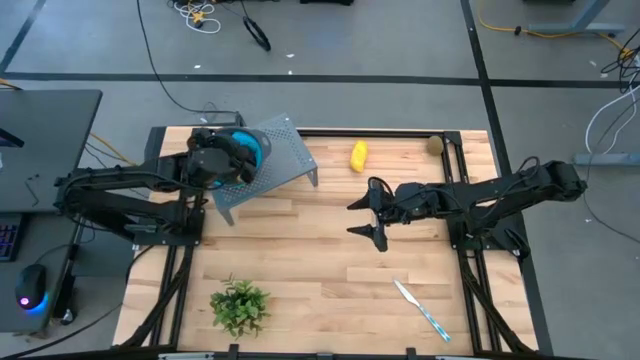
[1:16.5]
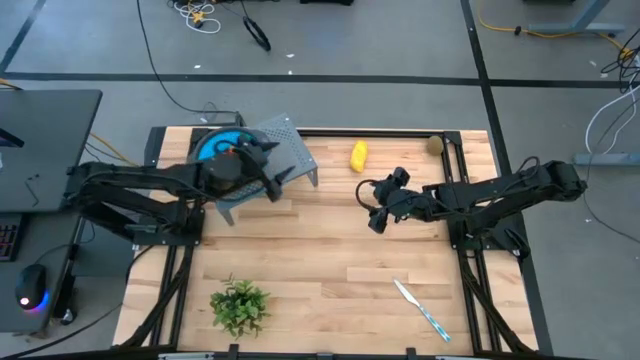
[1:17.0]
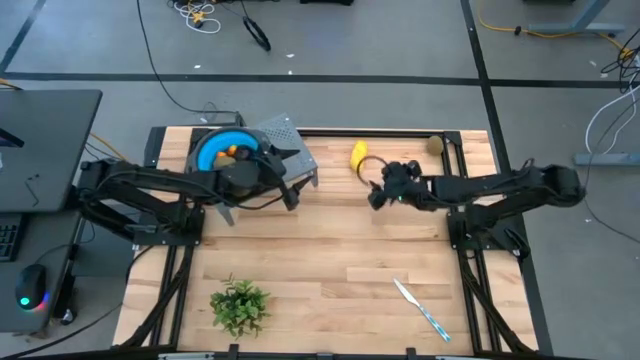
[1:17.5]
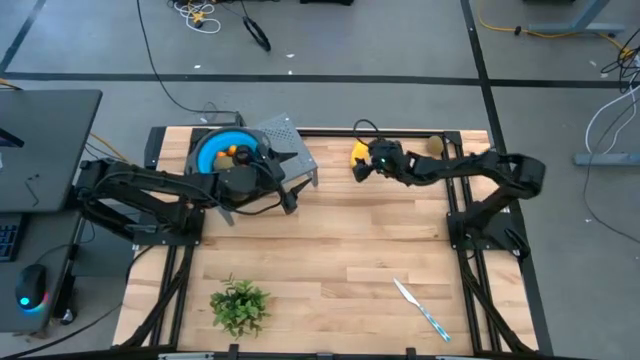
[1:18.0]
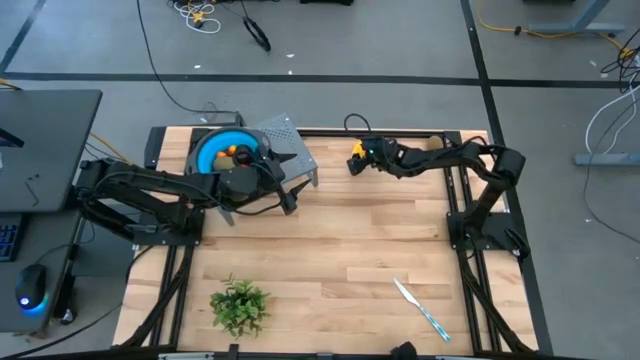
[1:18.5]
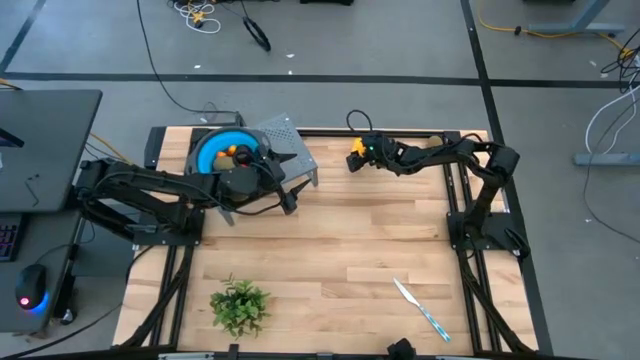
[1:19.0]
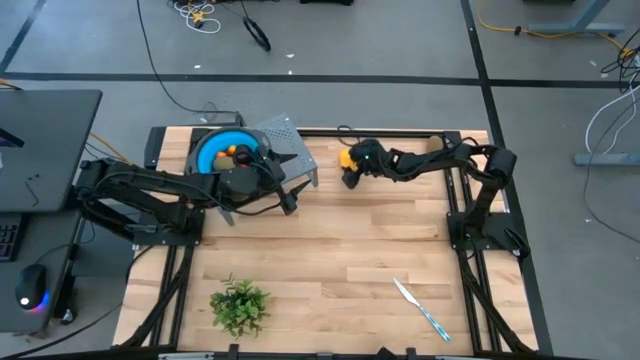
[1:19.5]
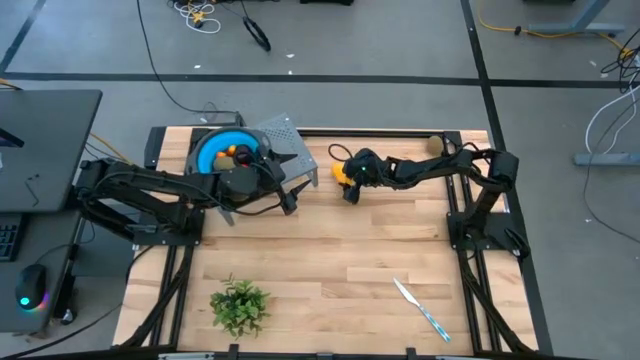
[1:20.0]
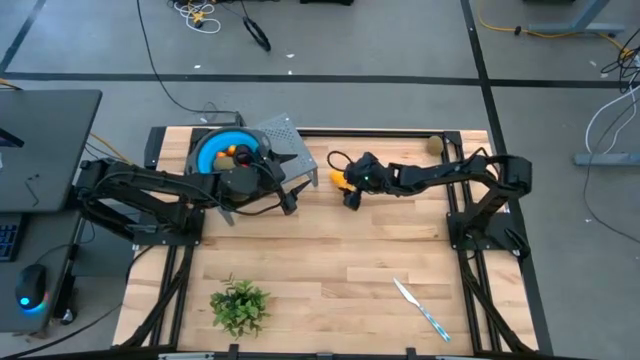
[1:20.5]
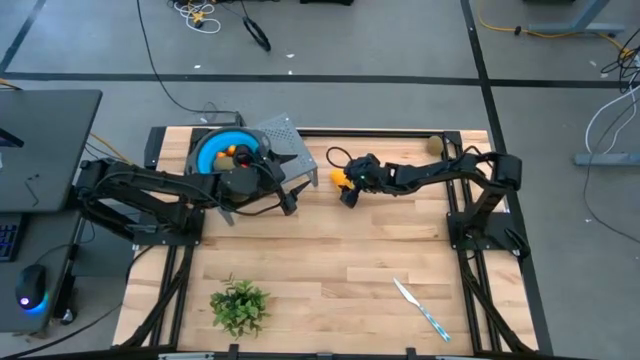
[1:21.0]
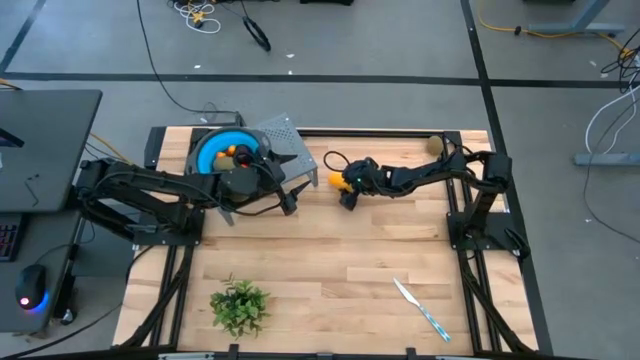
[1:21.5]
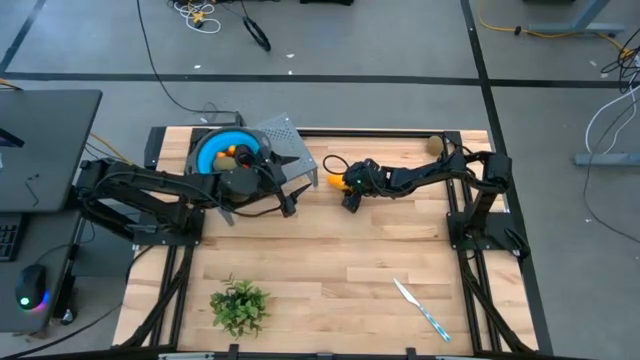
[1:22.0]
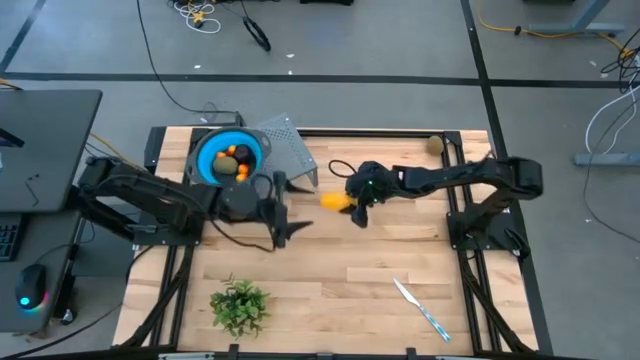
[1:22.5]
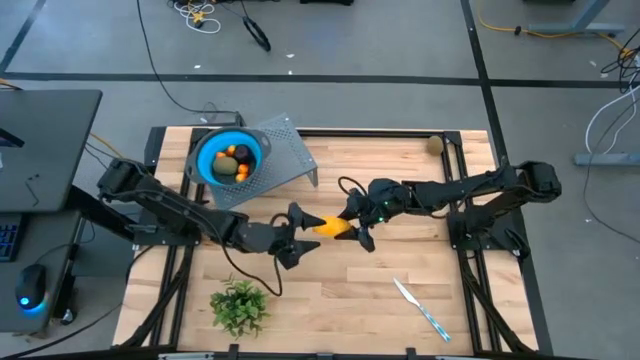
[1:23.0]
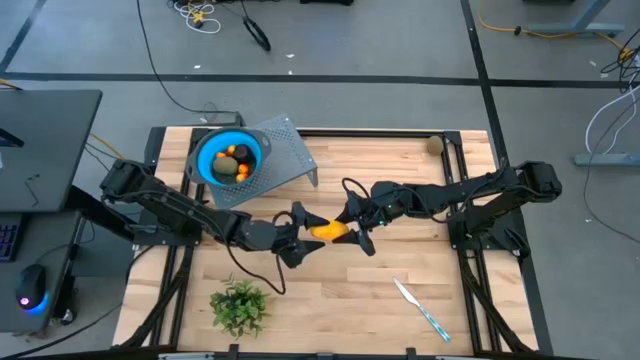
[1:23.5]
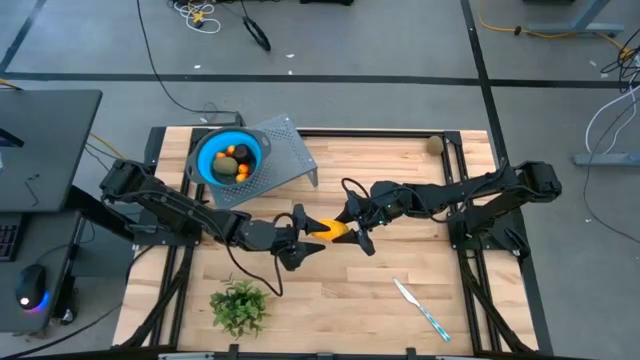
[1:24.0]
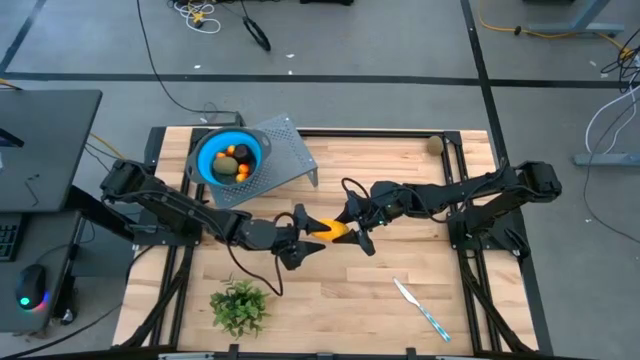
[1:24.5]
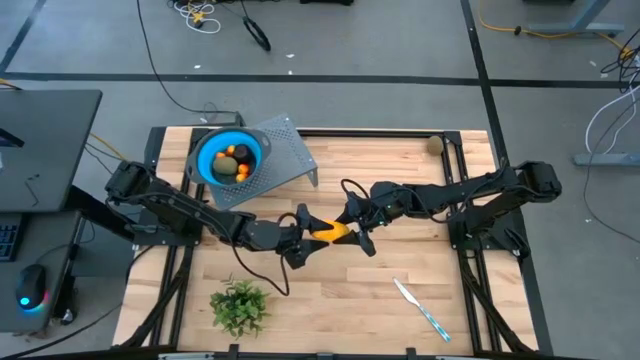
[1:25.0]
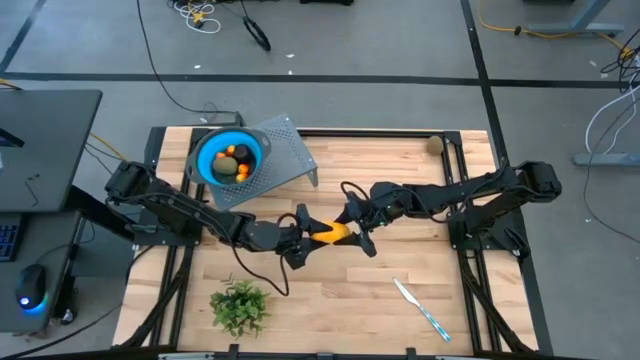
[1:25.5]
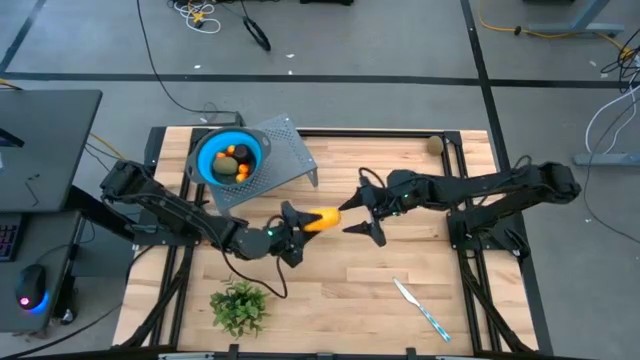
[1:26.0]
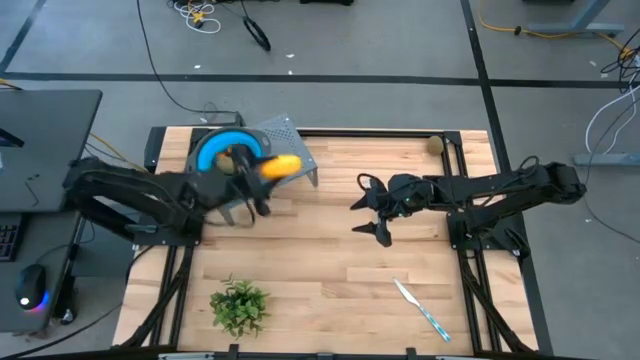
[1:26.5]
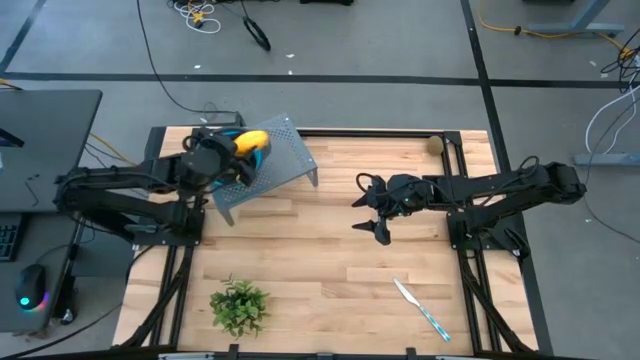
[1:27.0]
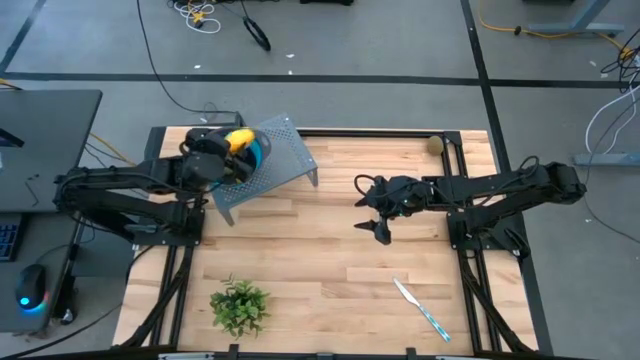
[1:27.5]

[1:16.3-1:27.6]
Task: Pick & Place Fruit
Put the yellow mango into the blue bowl on the shelf

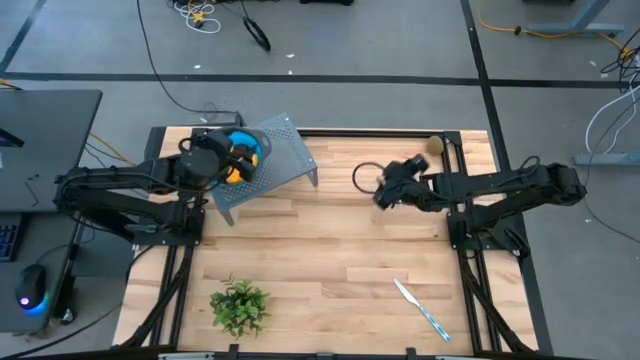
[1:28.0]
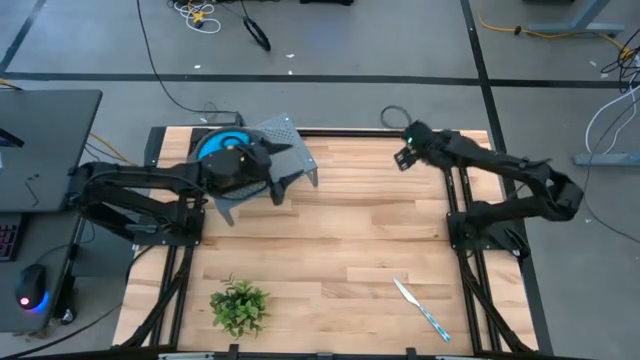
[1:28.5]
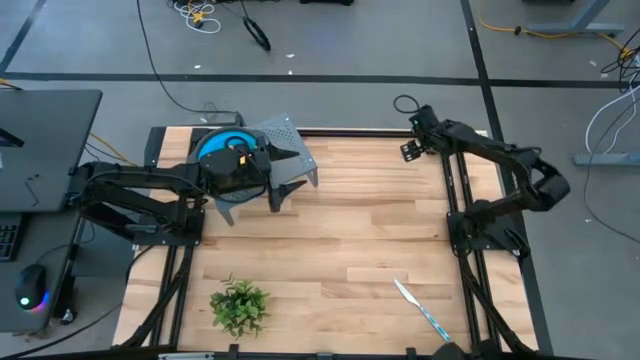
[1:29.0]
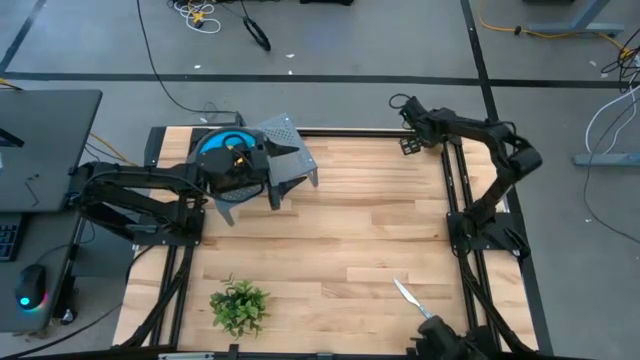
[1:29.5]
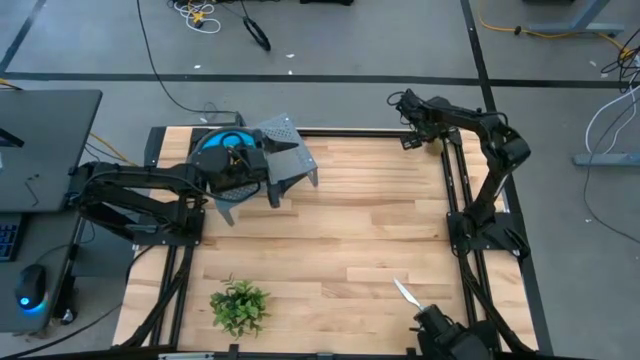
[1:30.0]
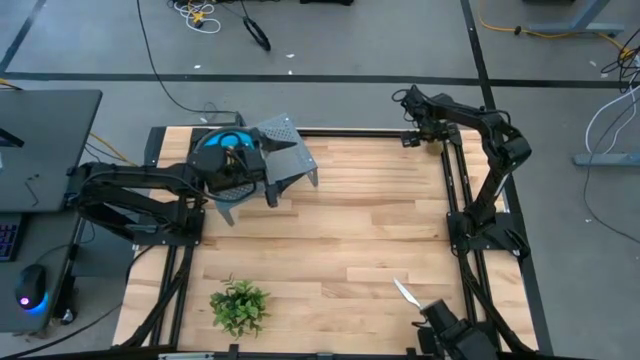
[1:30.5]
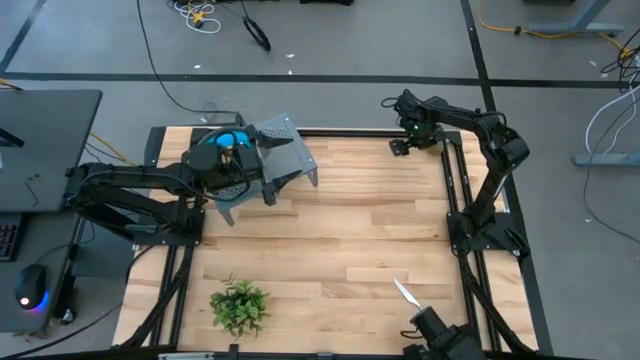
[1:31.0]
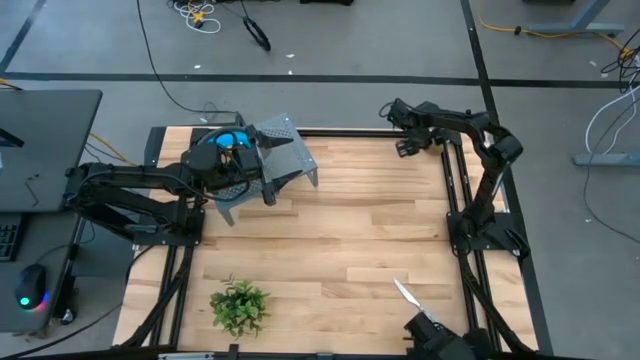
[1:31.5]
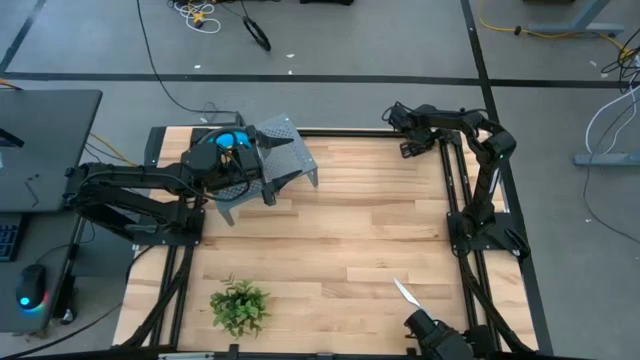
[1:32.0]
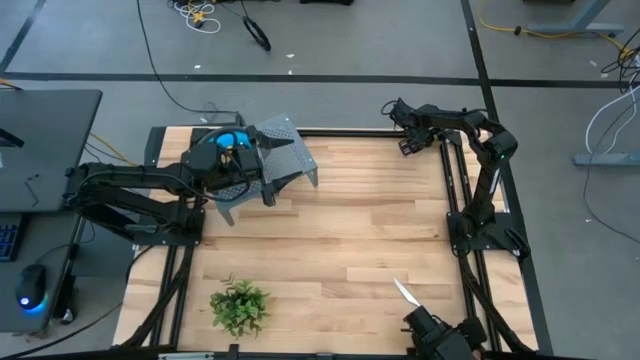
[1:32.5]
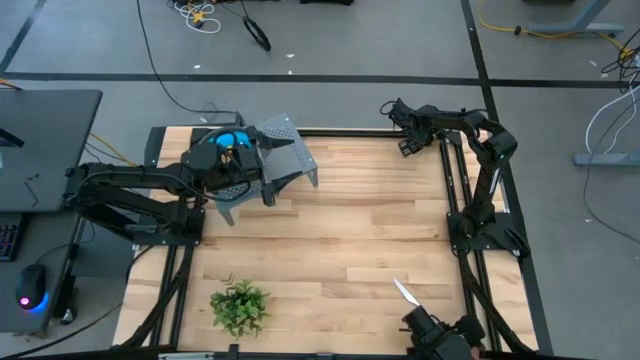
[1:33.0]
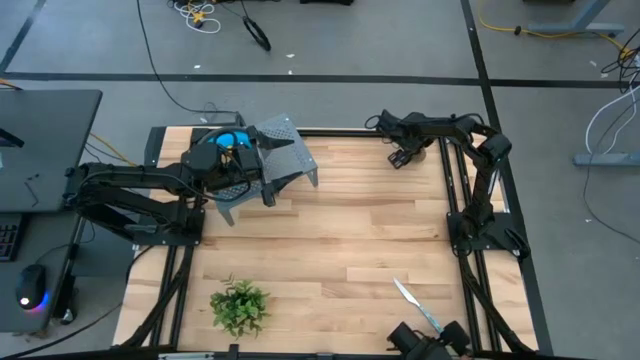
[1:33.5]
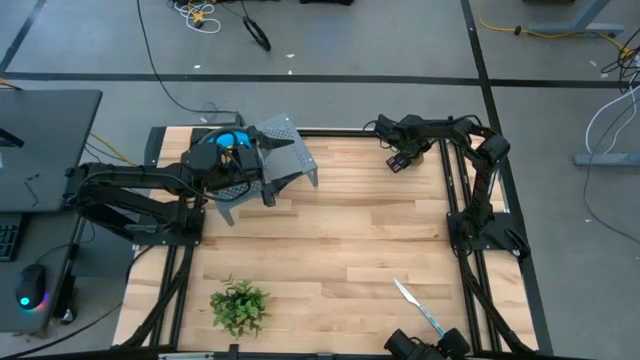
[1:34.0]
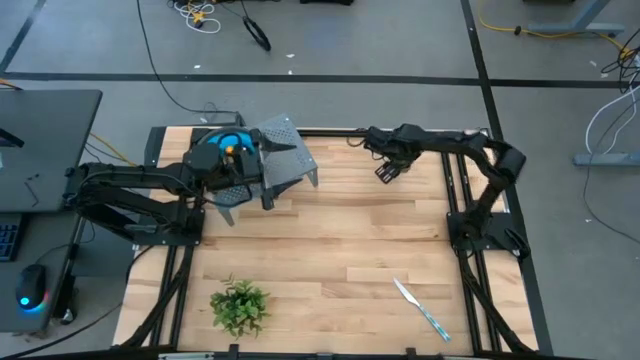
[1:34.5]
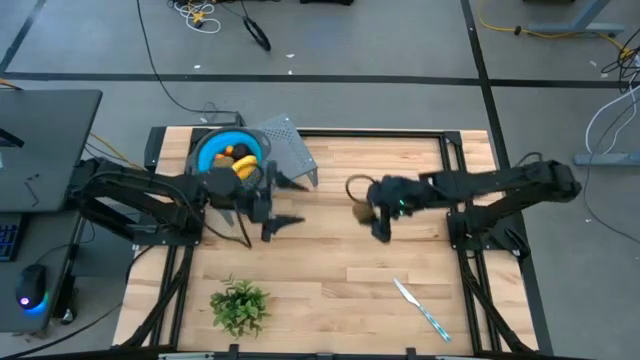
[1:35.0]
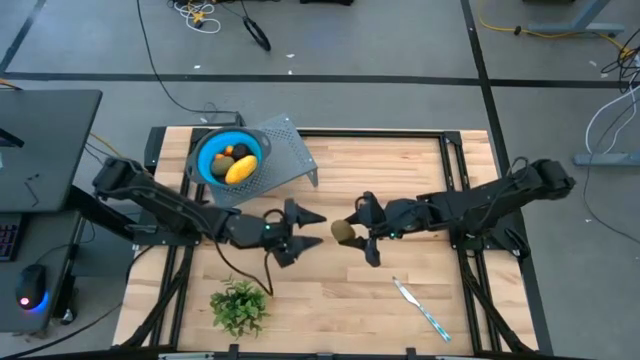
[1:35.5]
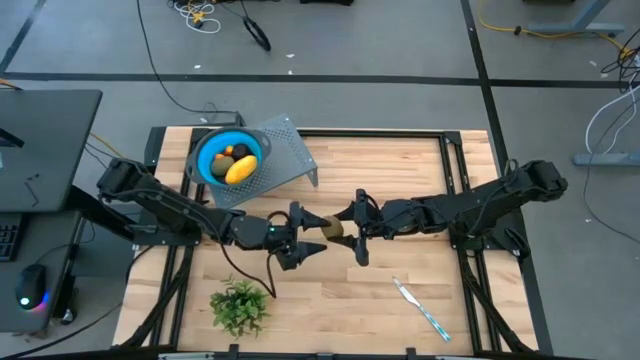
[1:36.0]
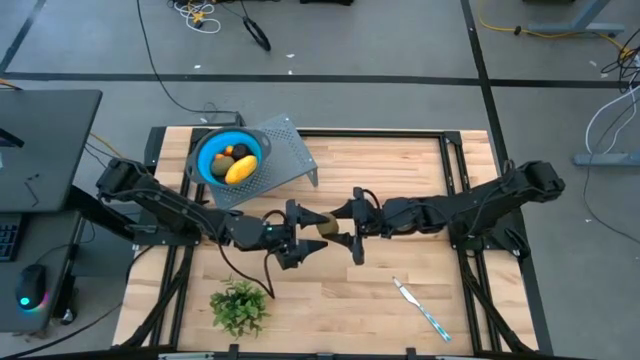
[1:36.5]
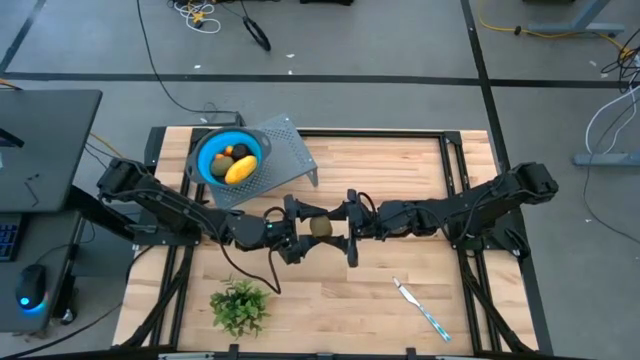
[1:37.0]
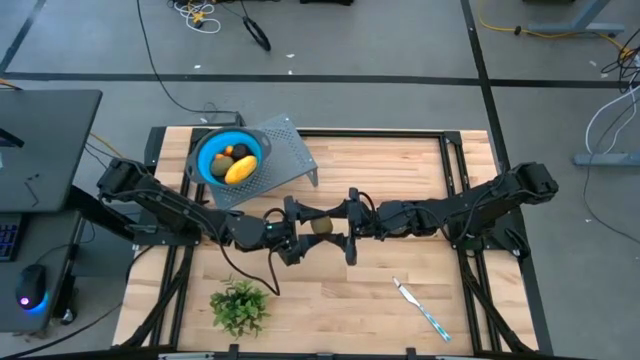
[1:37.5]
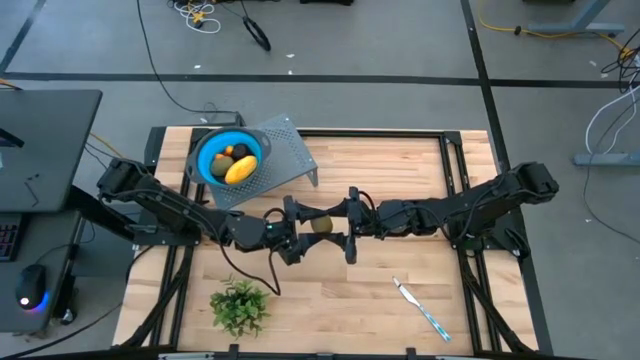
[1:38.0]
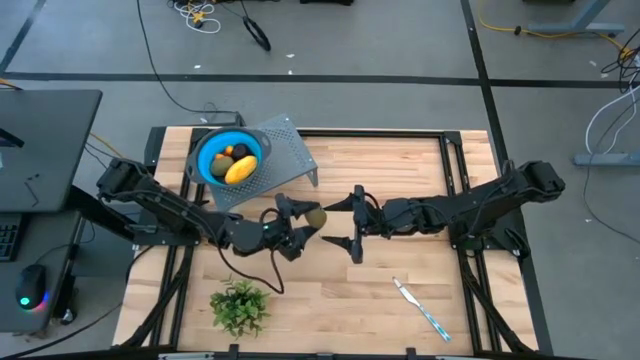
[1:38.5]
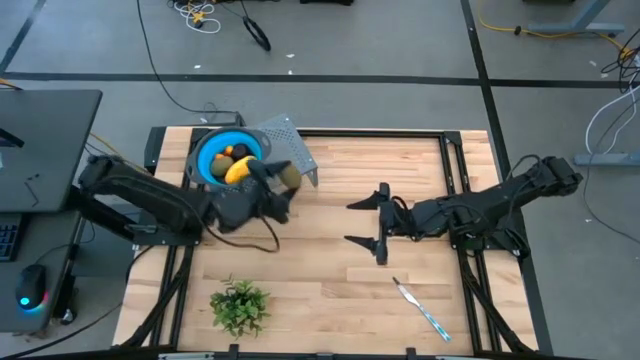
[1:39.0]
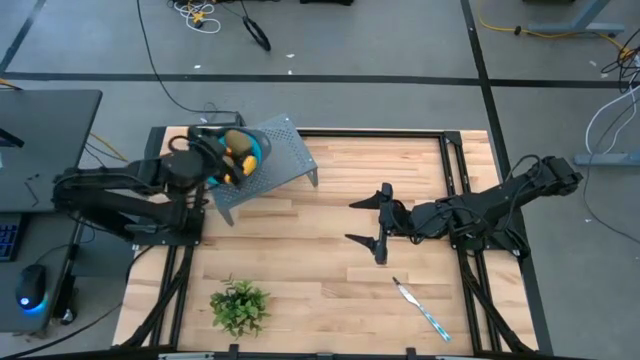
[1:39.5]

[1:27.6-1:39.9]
Put the brown kiwi into the blue strainer bowl on the shelf
